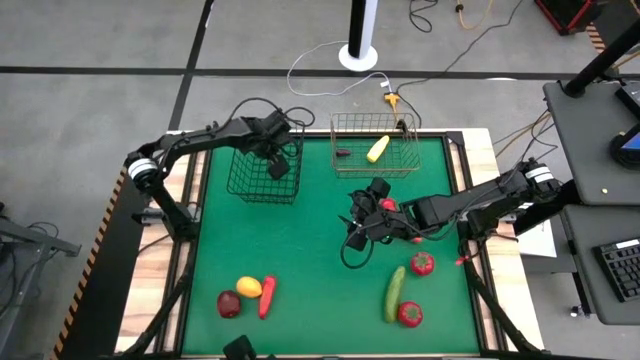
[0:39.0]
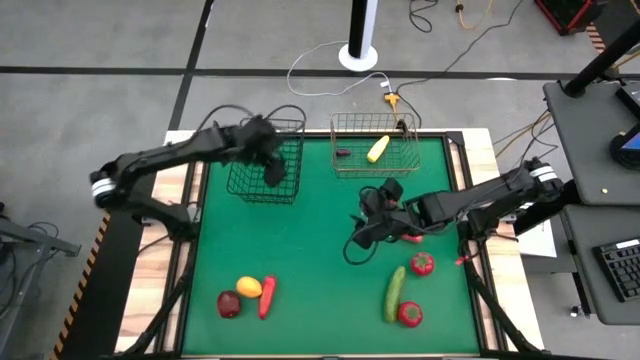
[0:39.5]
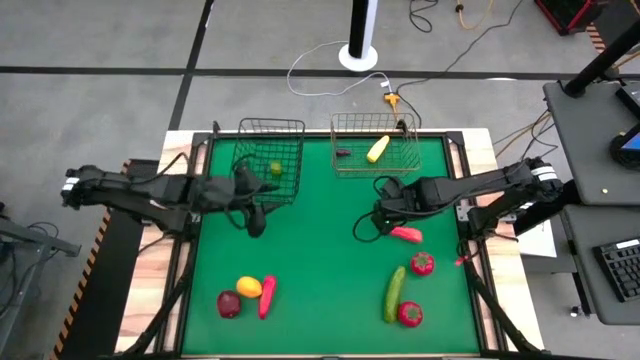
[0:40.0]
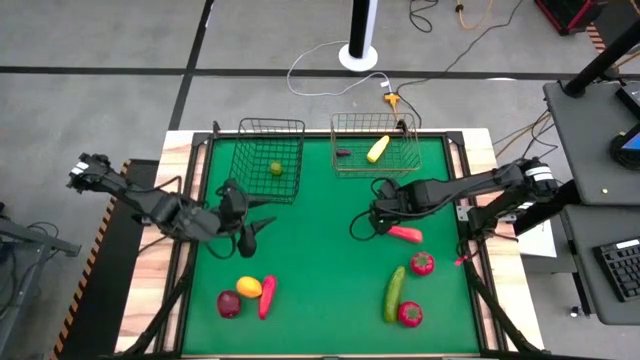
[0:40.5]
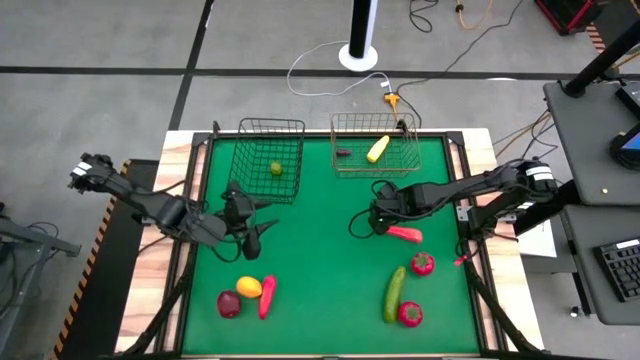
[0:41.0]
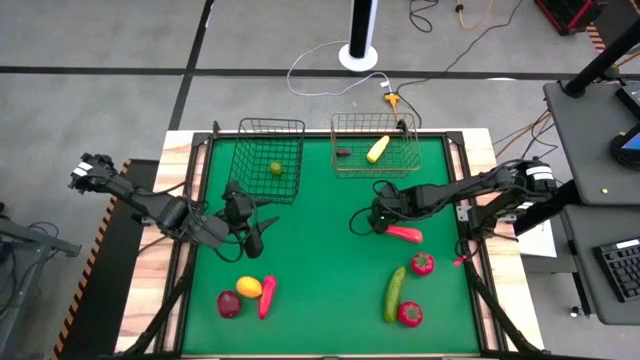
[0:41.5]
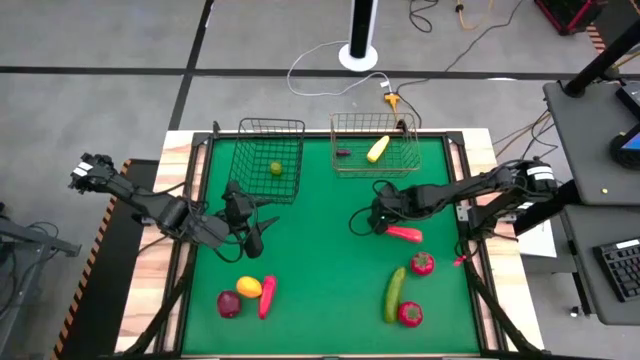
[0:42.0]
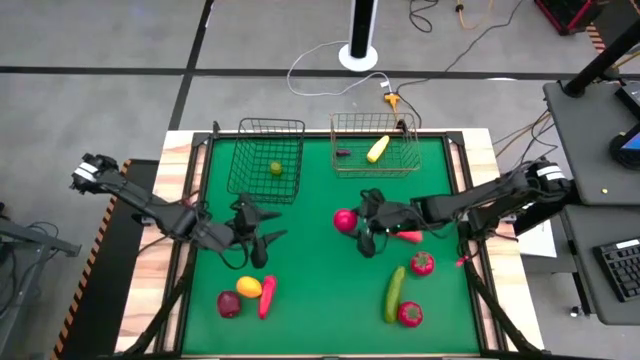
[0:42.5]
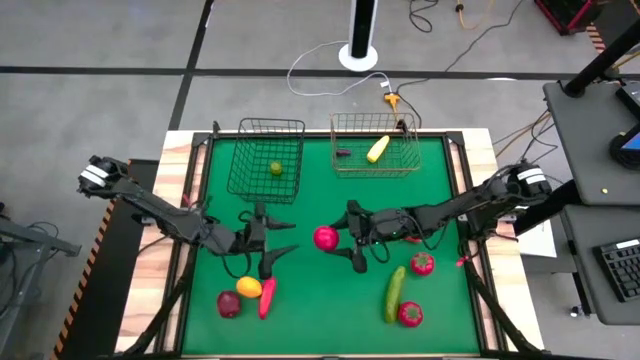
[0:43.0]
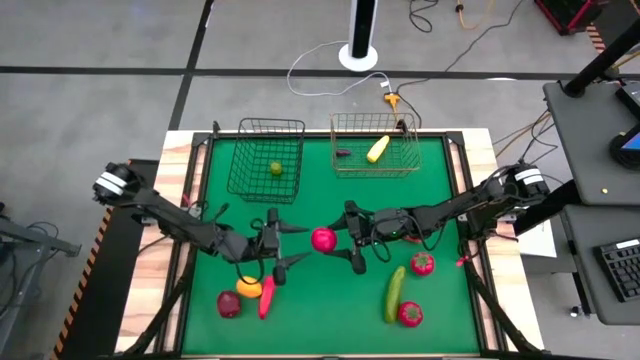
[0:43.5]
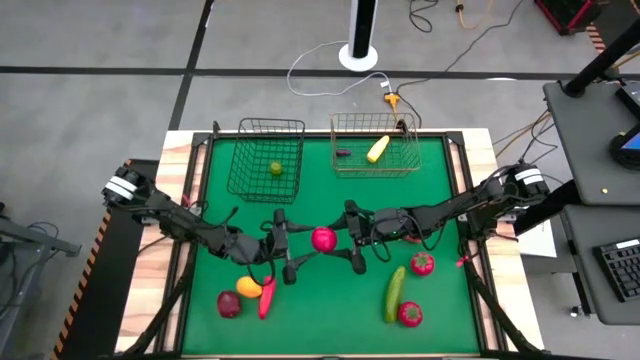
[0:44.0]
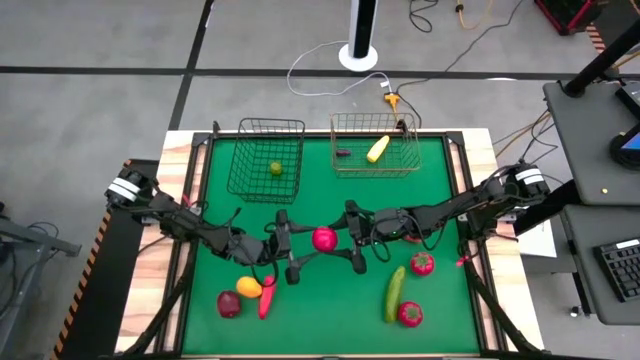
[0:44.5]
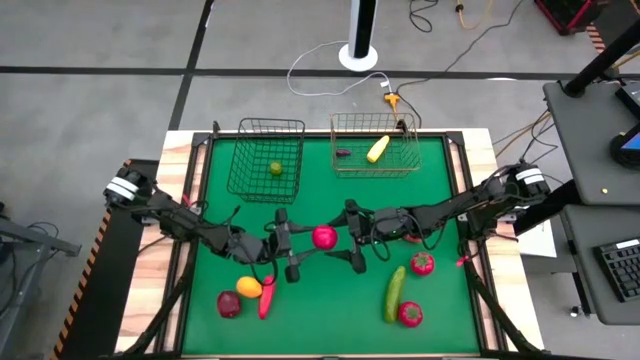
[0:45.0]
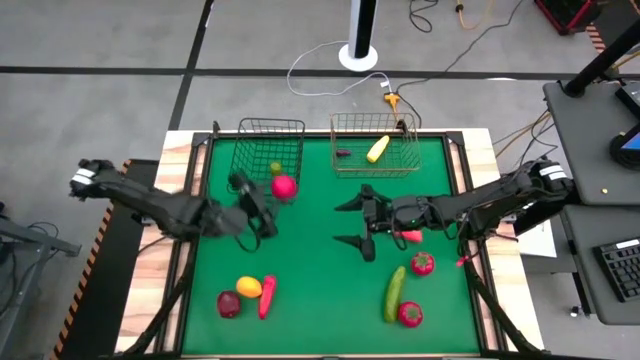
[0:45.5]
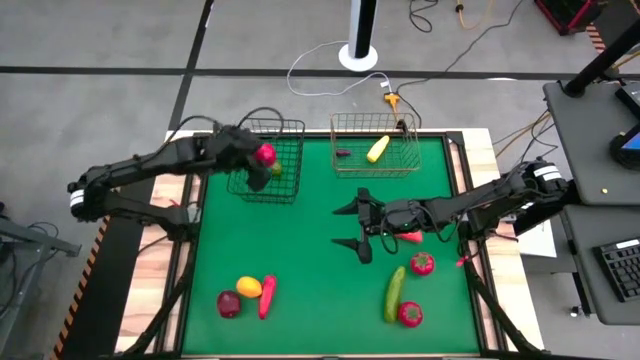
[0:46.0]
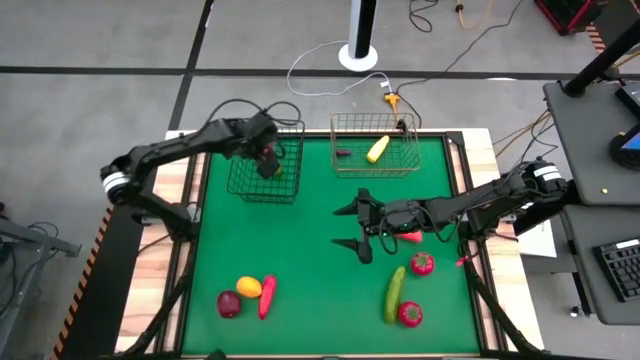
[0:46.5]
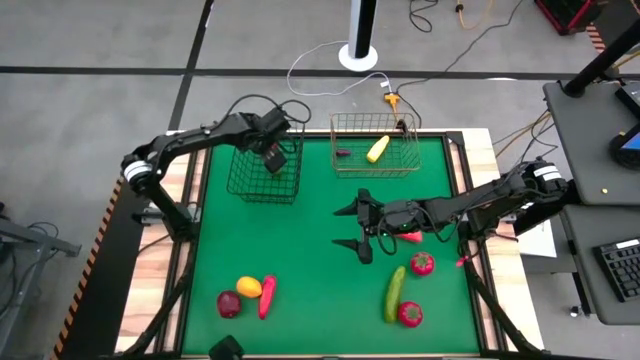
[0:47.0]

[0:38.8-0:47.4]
Task: Sort produce into baskets
Put the top tomato into the black wire basket

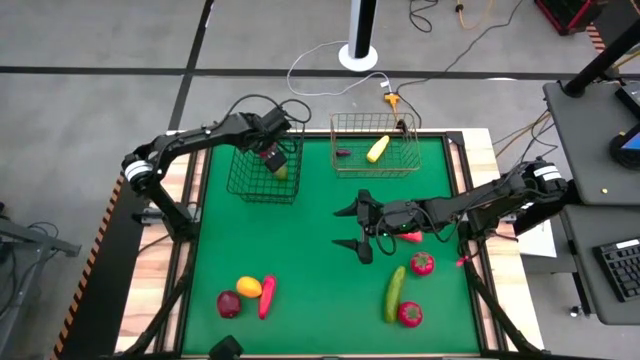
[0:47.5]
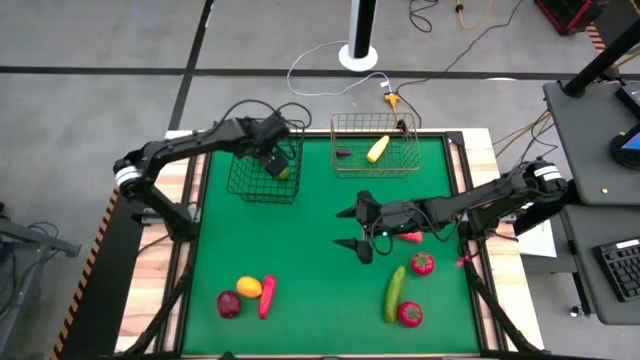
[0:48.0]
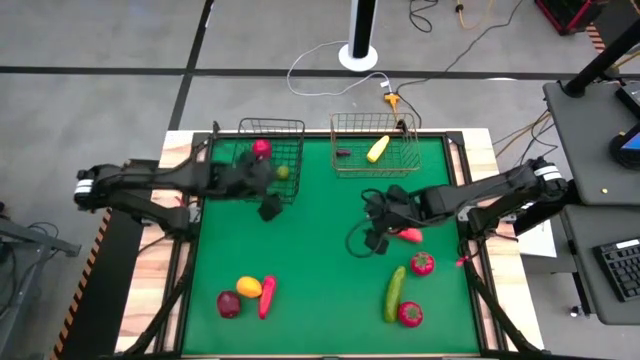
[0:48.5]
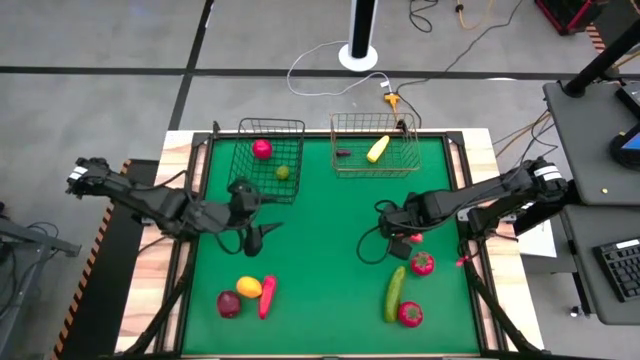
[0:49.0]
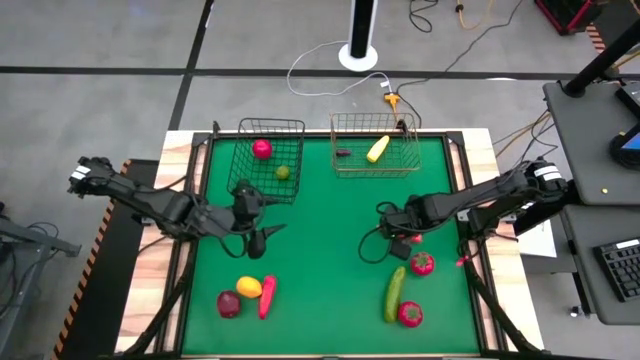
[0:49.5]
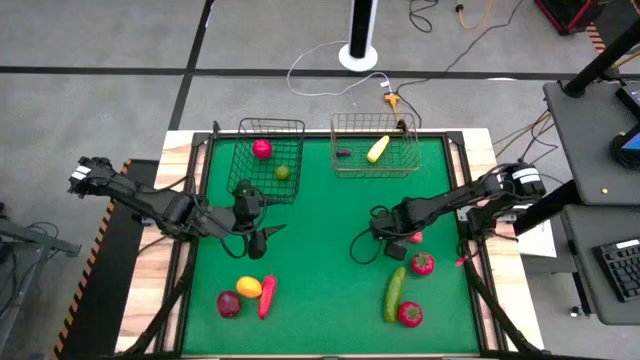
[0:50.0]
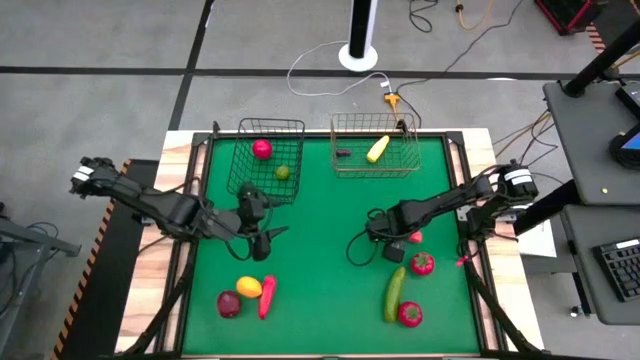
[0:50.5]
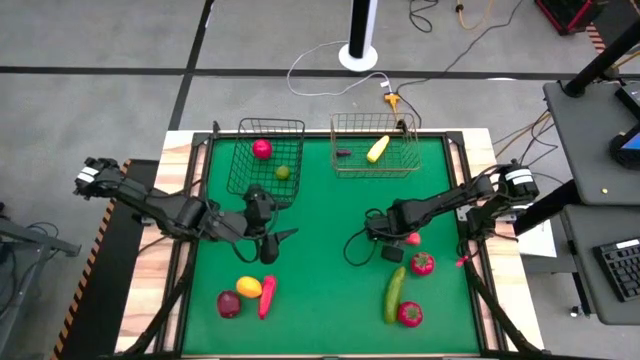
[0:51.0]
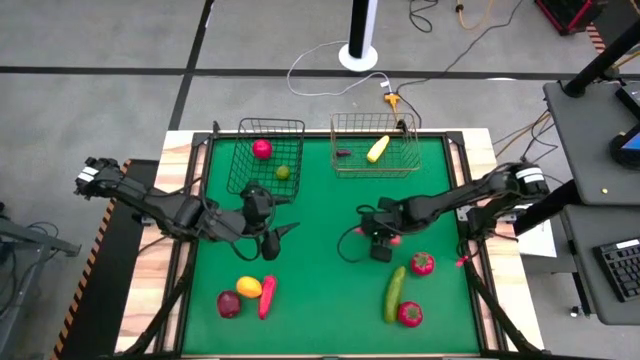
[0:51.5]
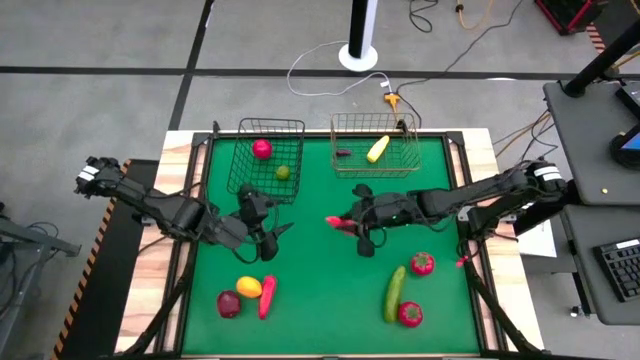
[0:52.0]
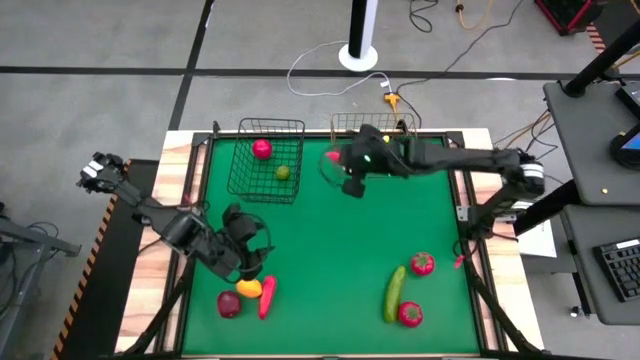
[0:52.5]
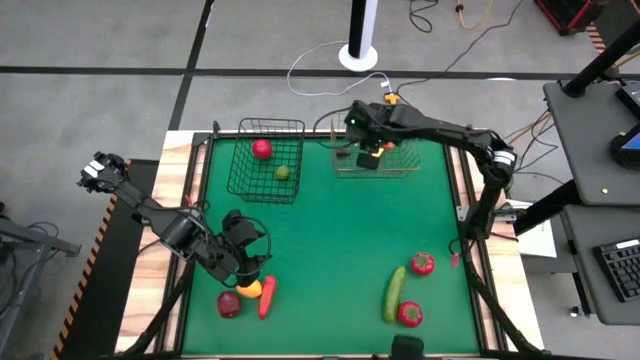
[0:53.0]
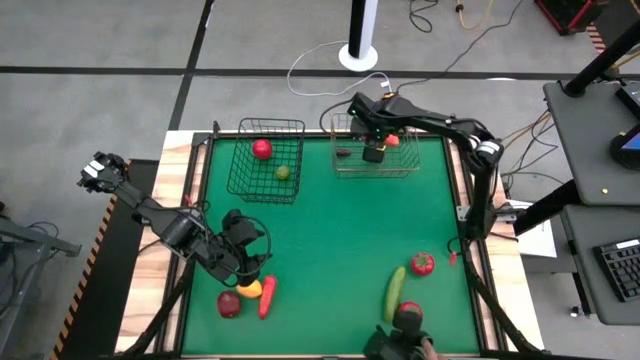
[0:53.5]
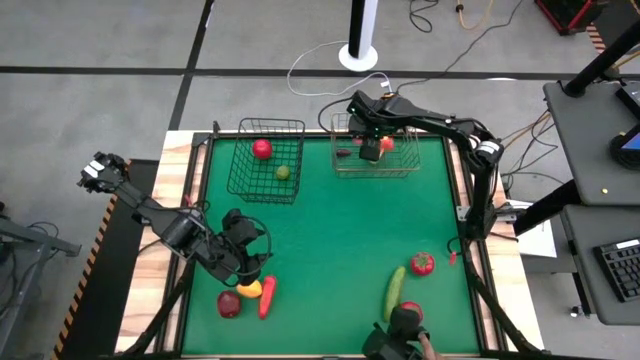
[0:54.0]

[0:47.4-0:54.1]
Put the carrot into the gold wire basket

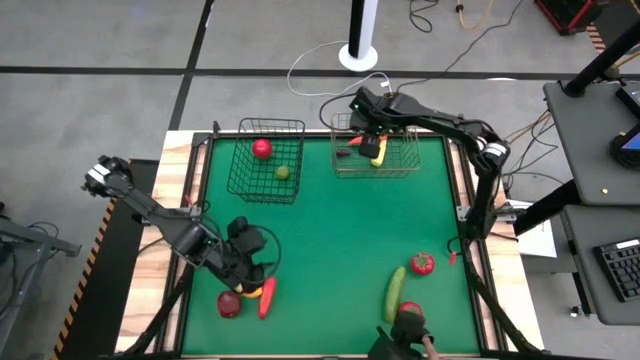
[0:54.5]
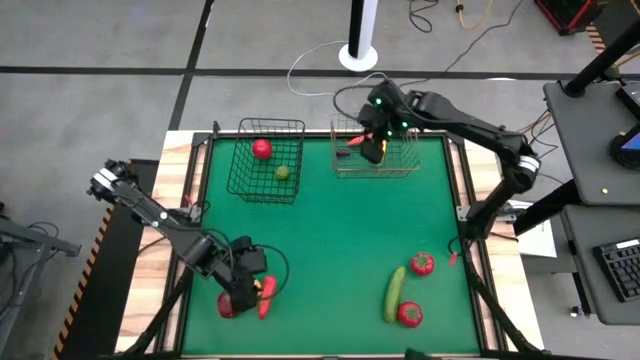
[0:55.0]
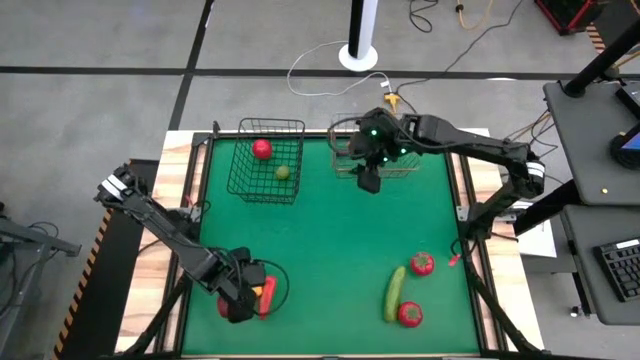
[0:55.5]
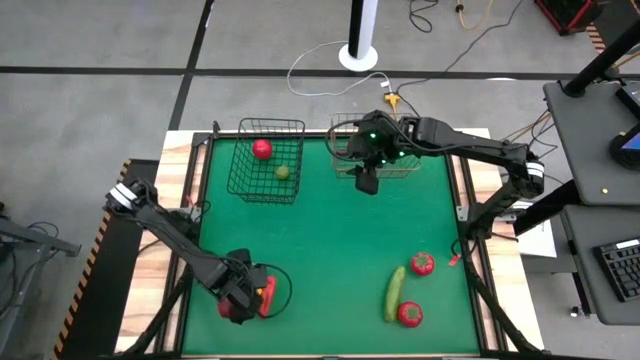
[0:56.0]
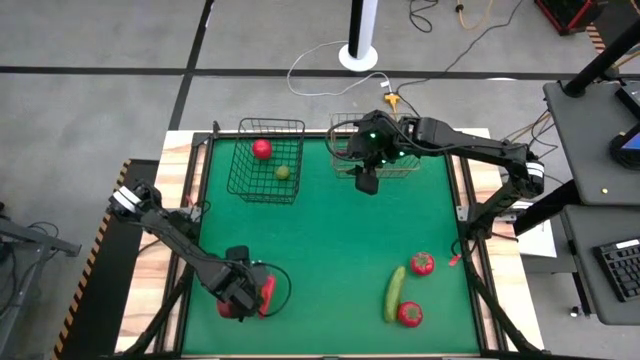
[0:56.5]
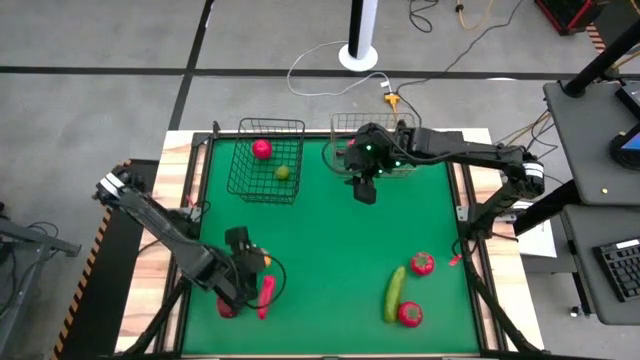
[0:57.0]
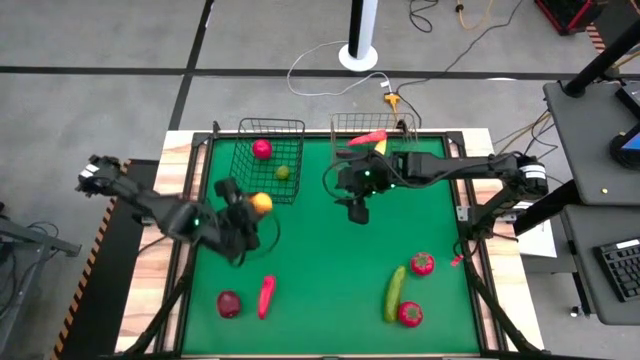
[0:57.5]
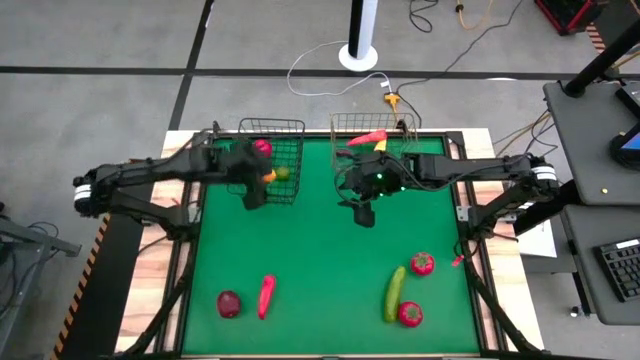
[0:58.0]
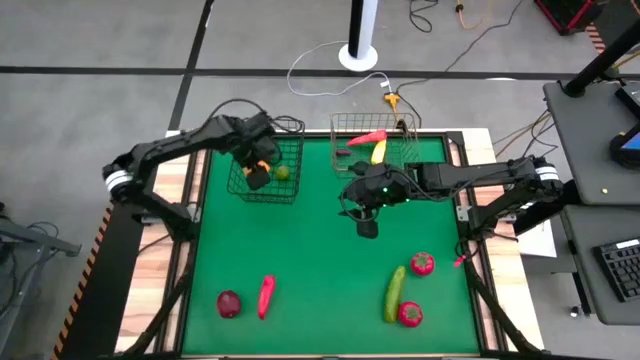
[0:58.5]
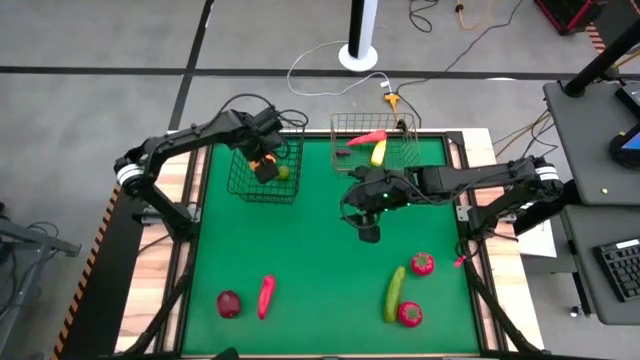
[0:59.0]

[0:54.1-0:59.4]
Put the lemon into the black wire basket
